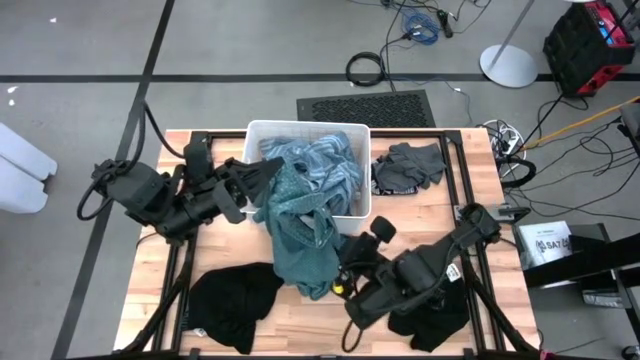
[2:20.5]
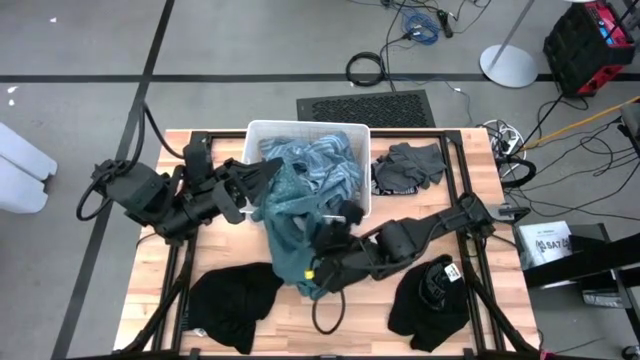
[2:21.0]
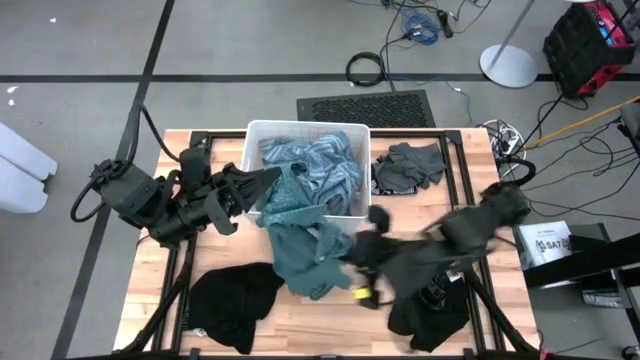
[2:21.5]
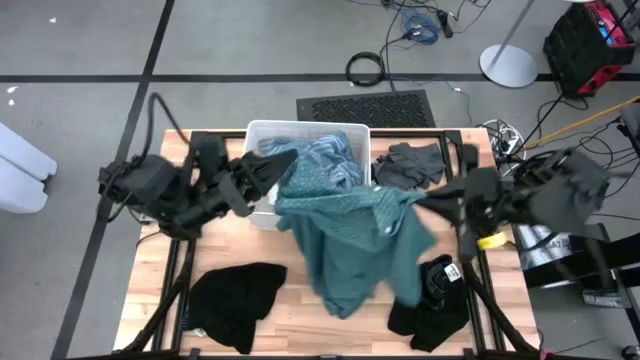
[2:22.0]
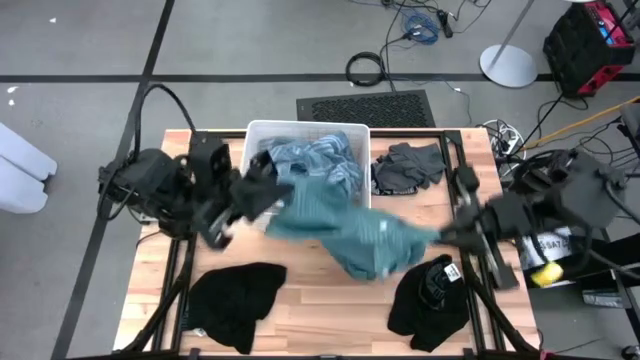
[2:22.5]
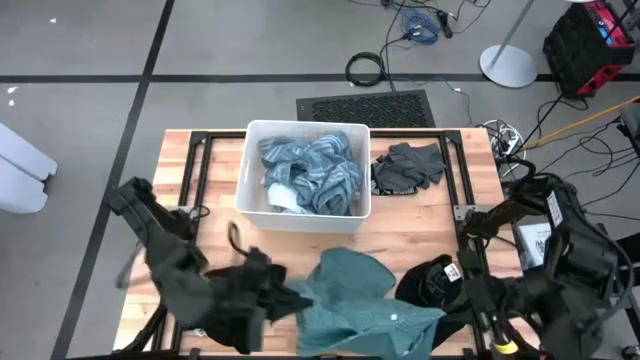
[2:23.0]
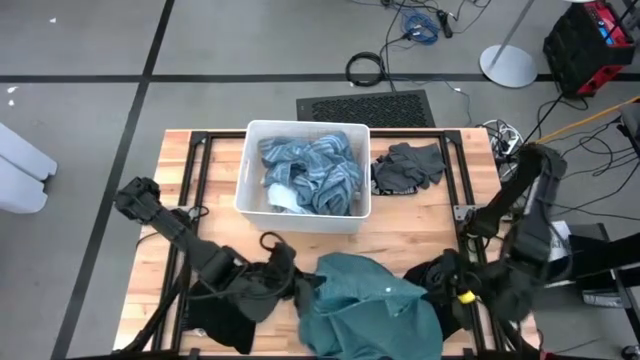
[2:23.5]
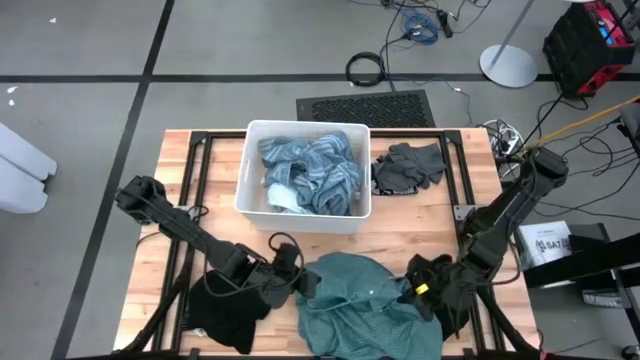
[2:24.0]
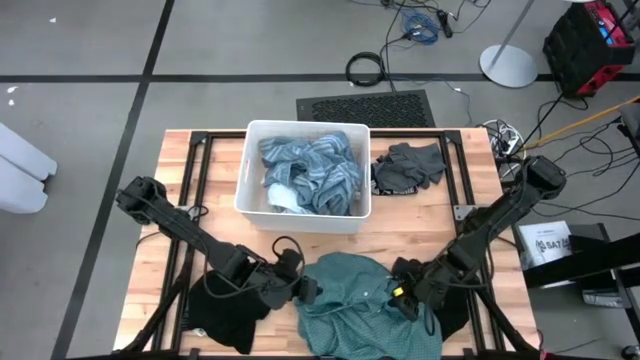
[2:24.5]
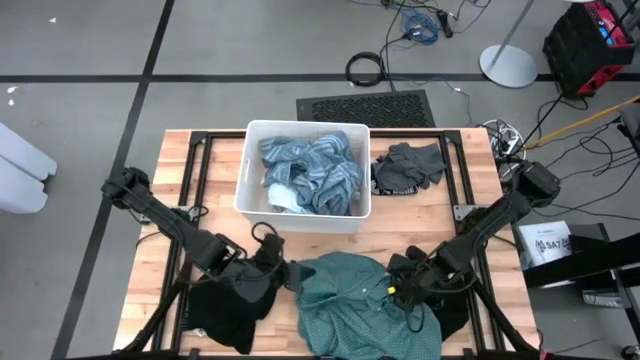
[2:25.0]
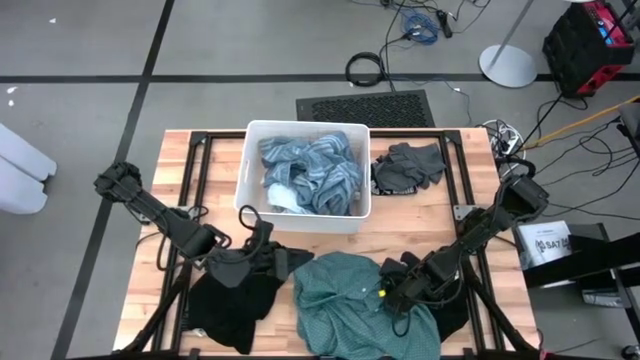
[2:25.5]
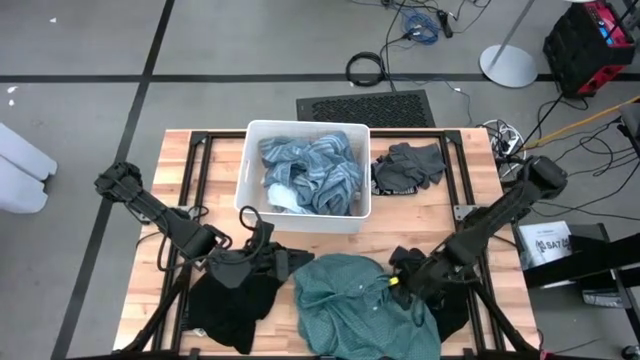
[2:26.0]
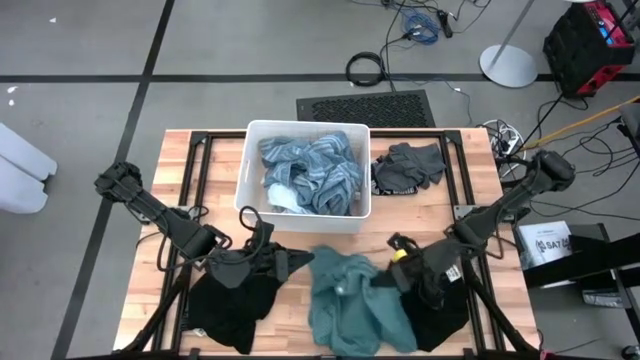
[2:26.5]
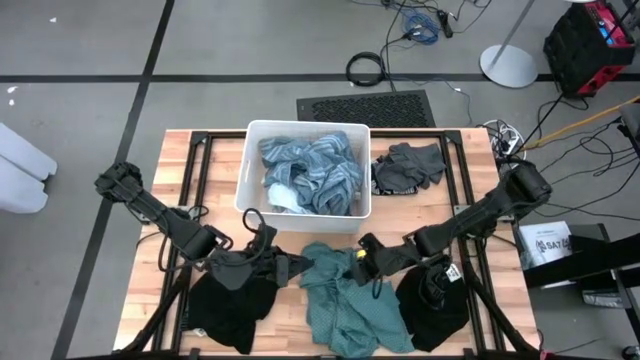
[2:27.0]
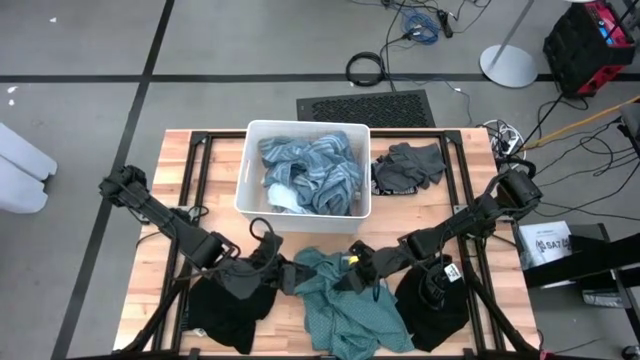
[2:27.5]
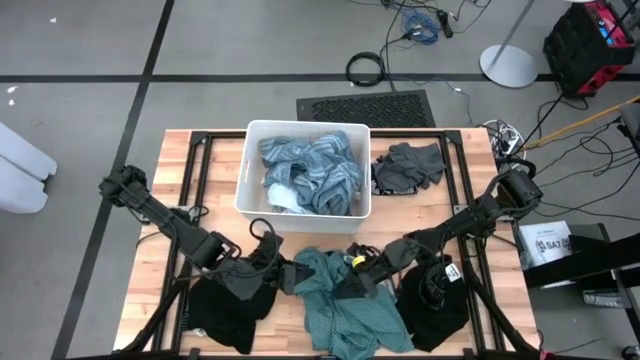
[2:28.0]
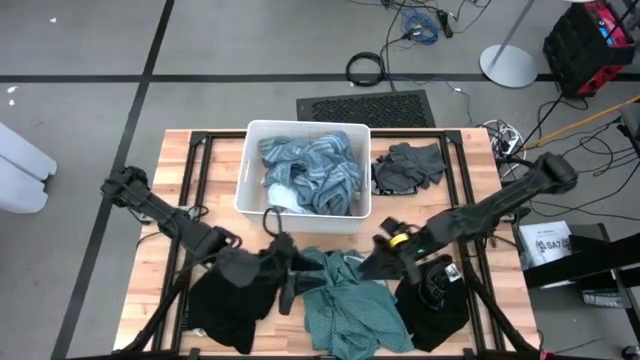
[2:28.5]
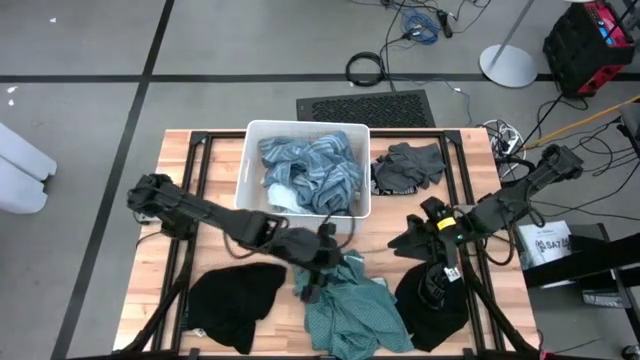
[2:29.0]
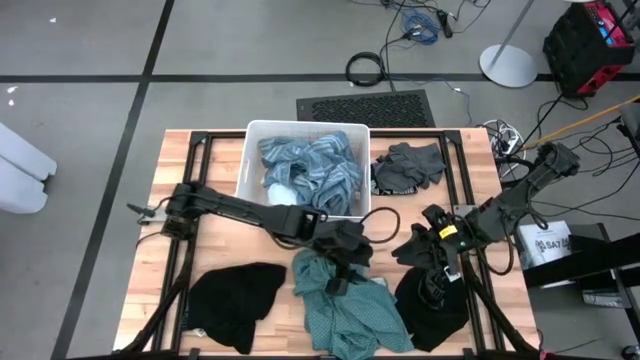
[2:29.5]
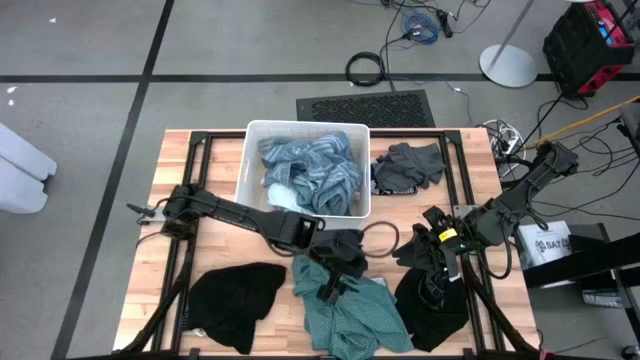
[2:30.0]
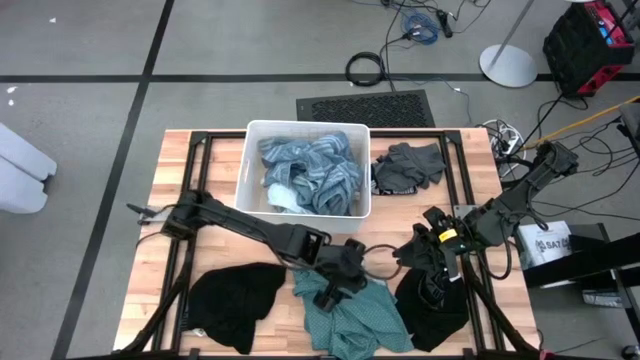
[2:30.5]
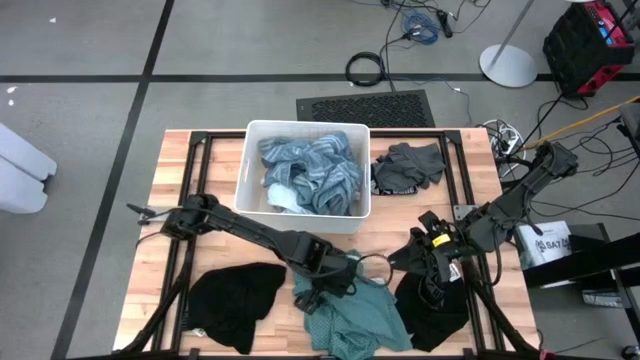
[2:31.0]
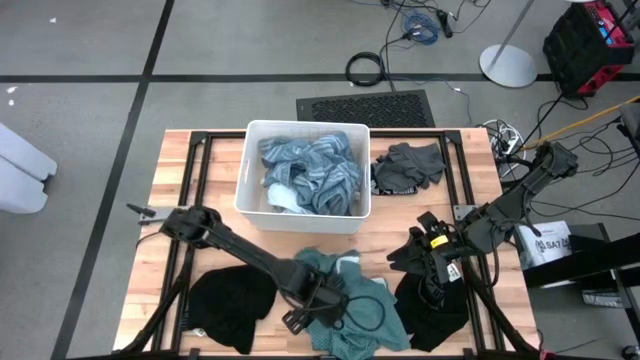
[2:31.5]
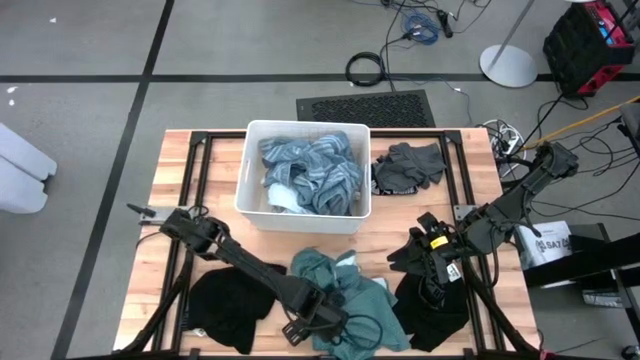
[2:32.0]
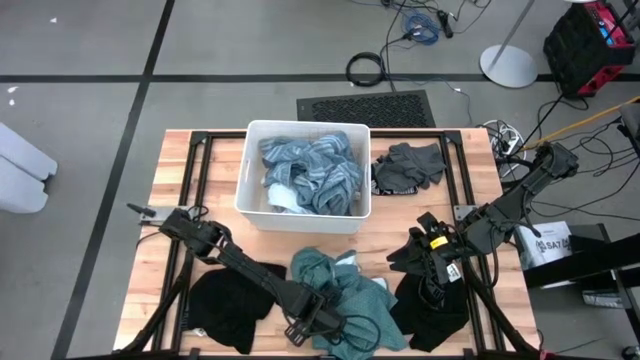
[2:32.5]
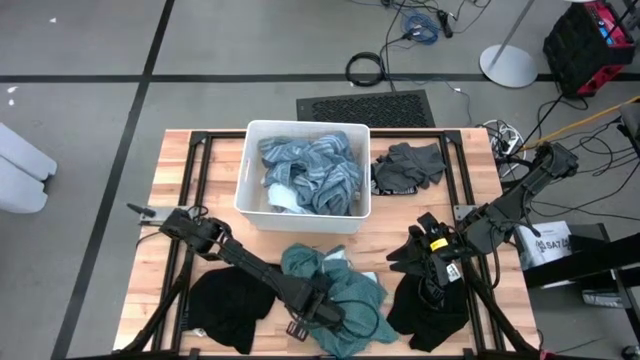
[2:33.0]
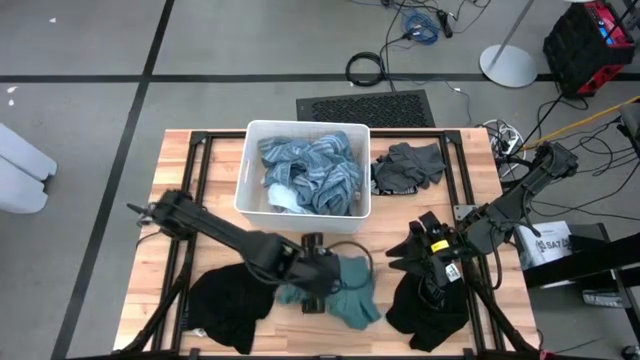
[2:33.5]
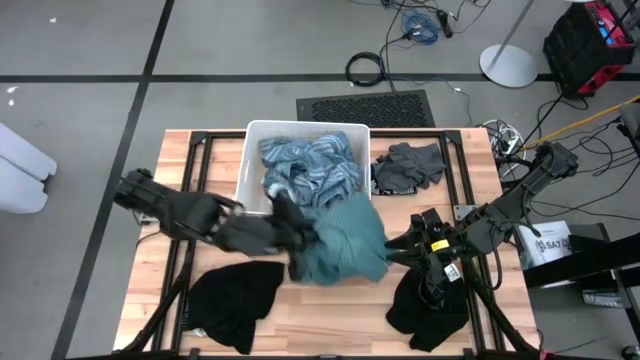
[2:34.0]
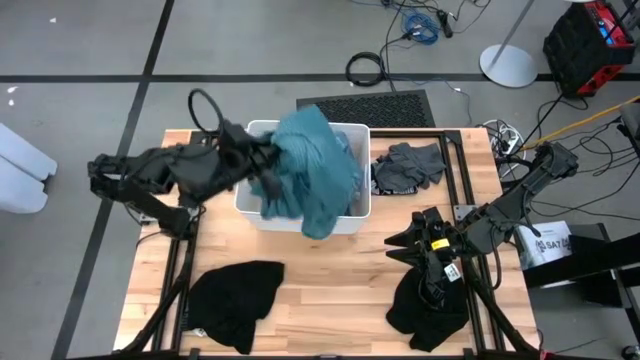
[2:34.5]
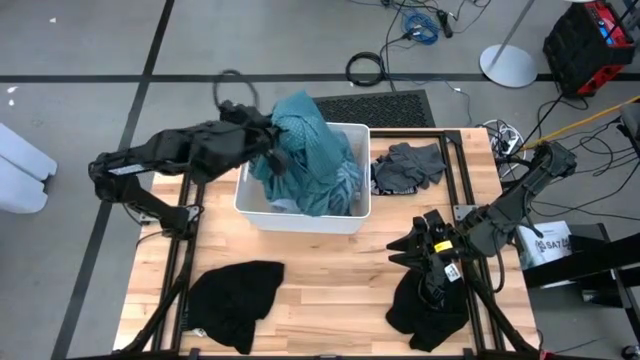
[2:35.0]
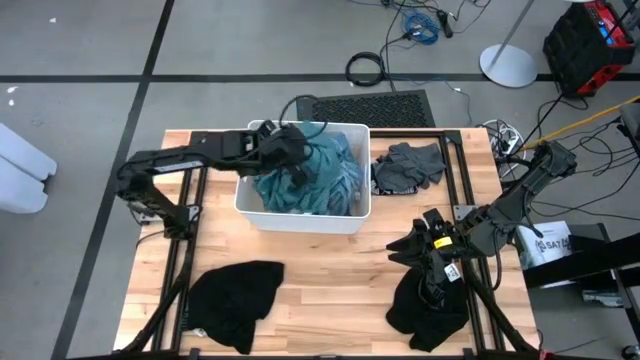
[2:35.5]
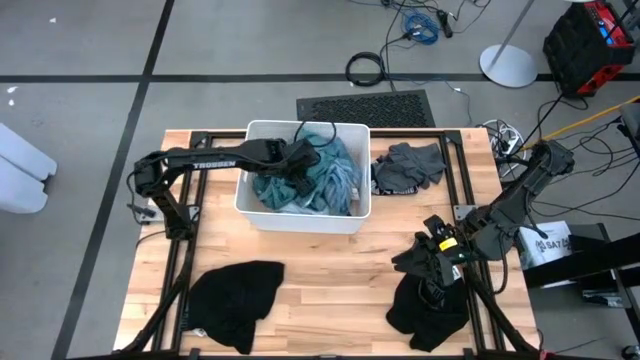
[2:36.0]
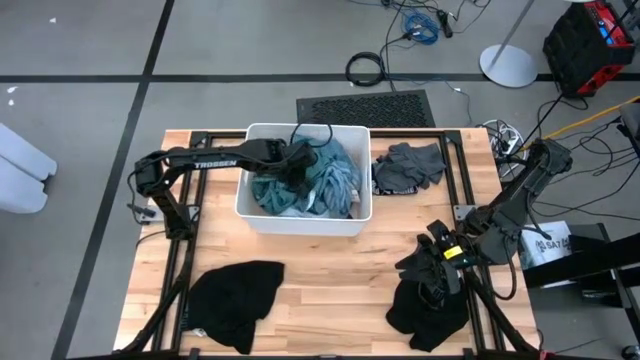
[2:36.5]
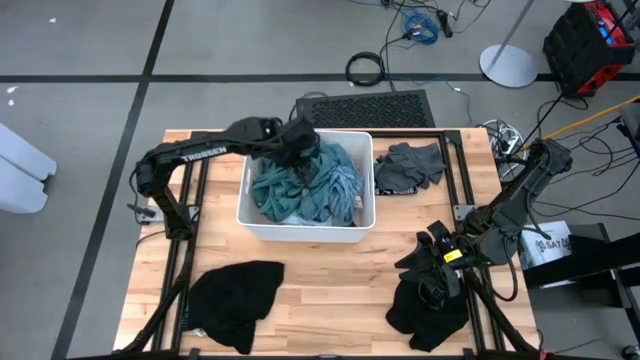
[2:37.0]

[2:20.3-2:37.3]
Task: Sort clothes
Put the green polo shirt into the white laundry bin

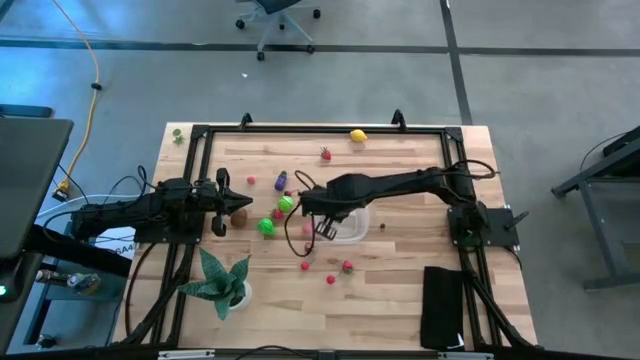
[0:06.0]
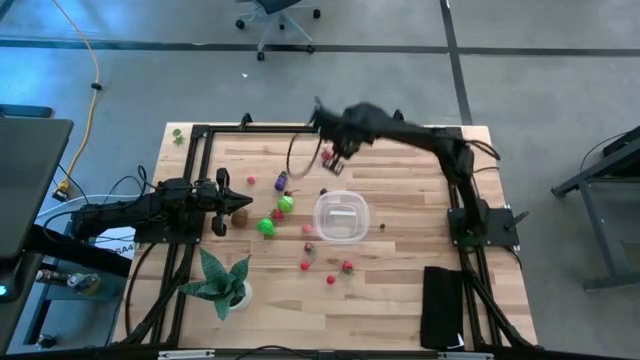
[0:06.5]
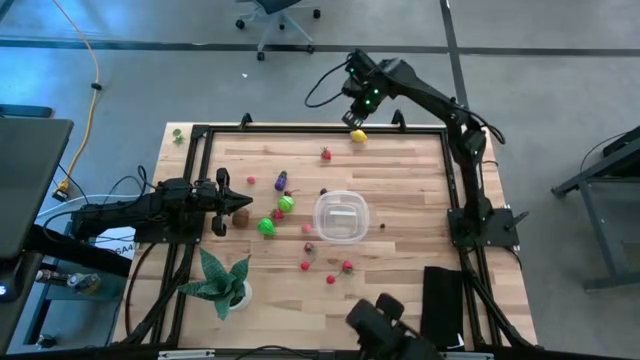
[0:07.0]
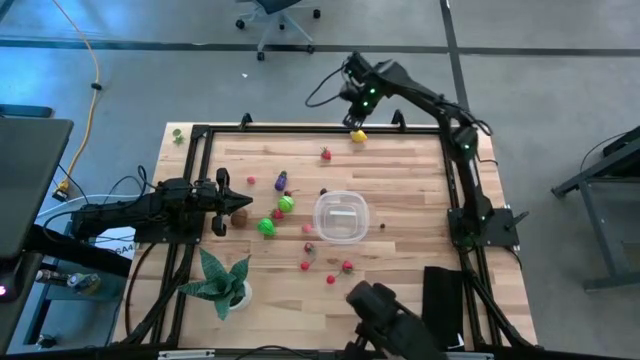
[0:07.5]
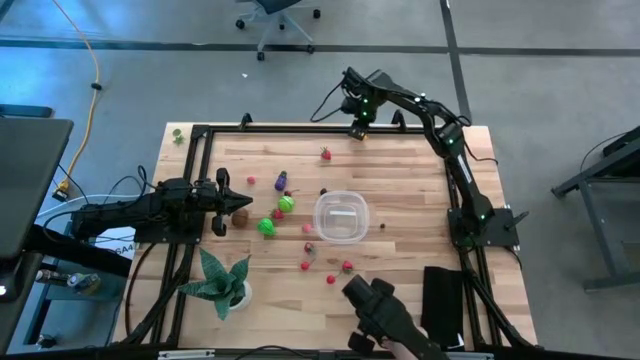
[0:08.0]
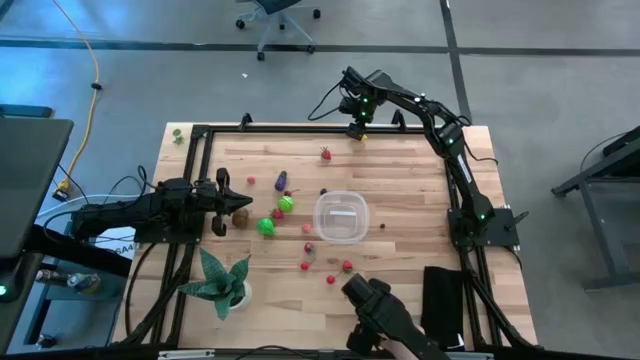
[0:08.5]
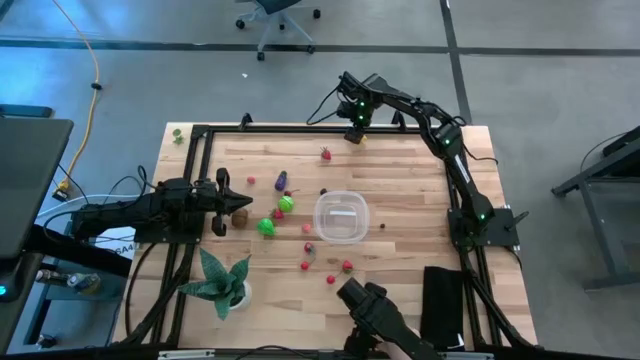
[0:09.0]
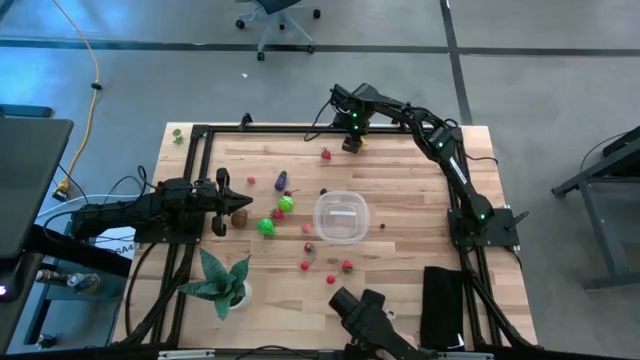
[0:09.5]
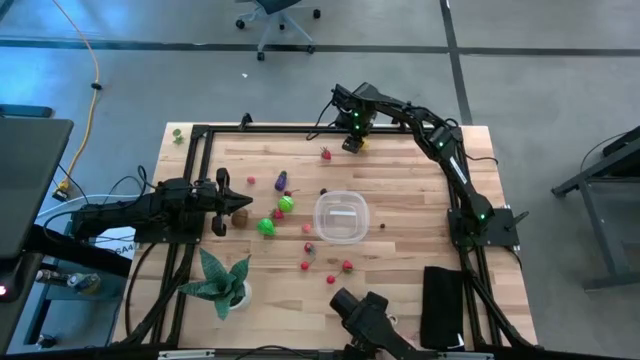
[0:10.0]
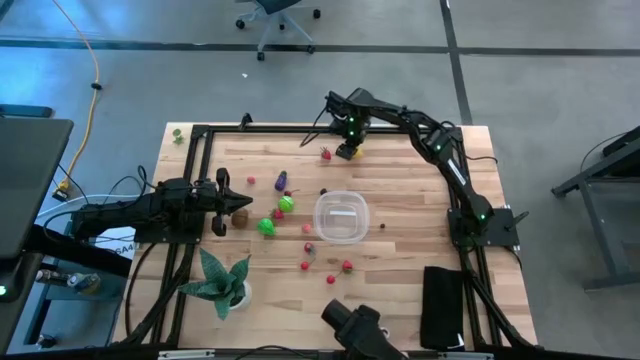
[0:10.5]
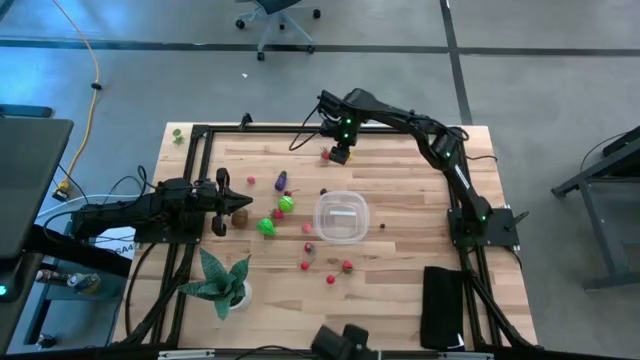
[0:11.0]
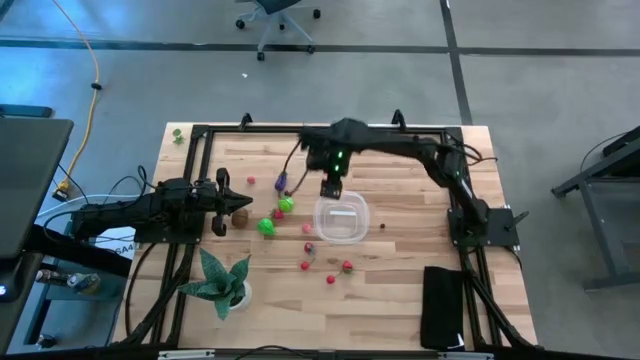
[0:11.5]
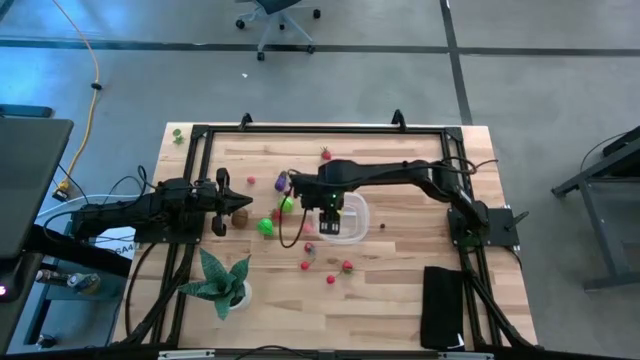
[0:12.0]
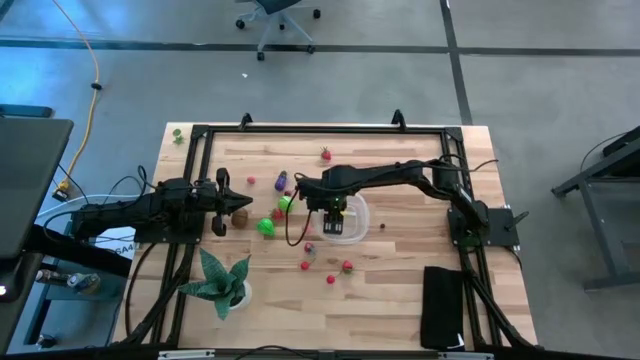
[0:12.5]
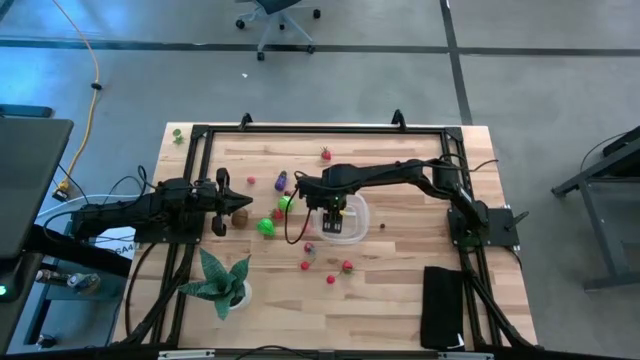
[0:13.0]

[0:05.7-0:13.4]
Task: Pick and placing Produce into tupperware
Put the yellow lemon into the transparent container
